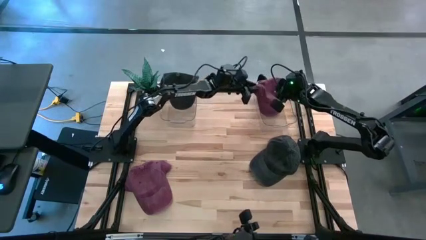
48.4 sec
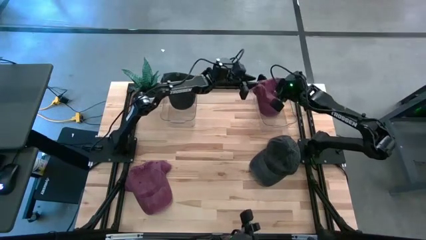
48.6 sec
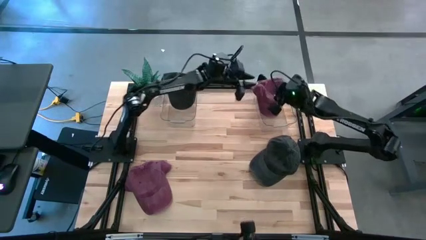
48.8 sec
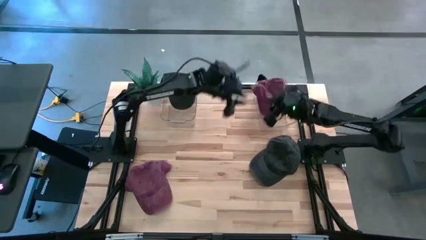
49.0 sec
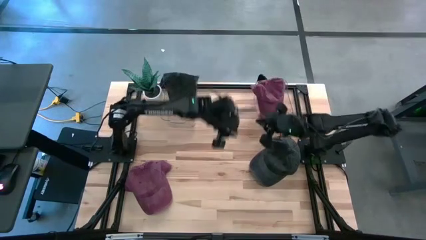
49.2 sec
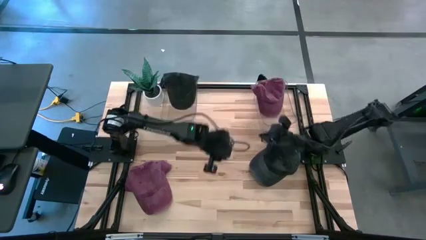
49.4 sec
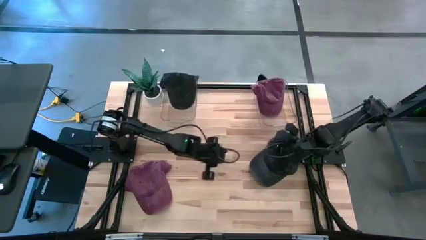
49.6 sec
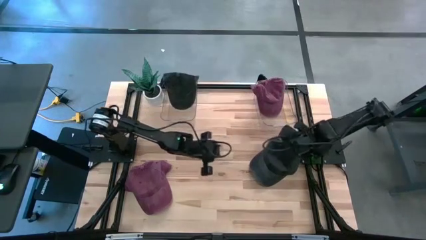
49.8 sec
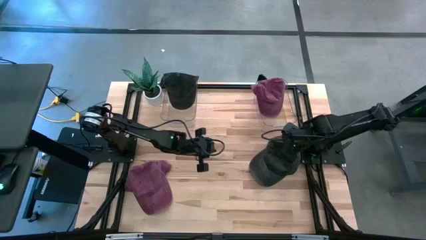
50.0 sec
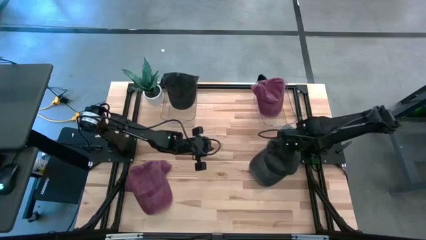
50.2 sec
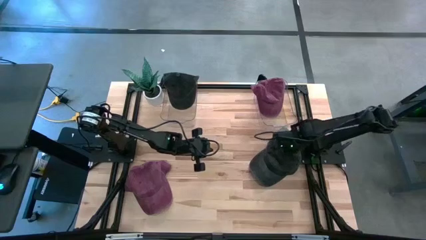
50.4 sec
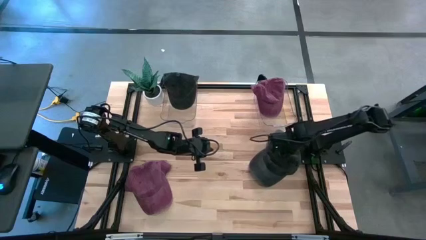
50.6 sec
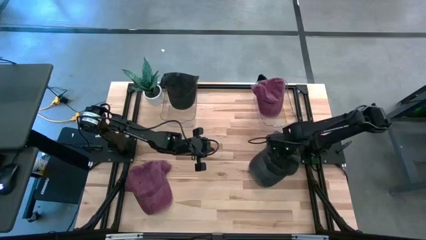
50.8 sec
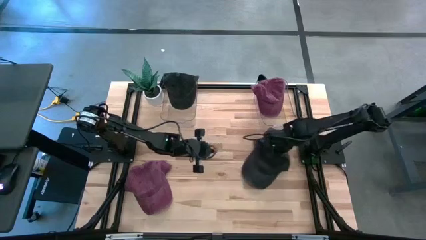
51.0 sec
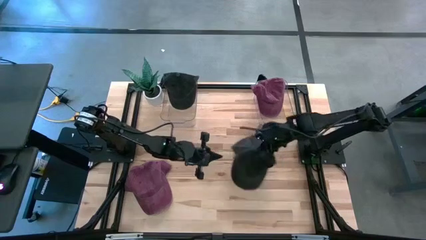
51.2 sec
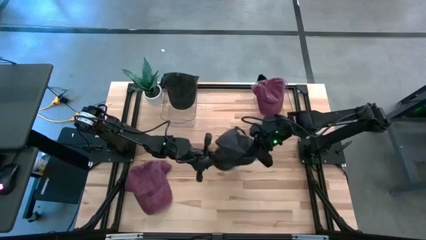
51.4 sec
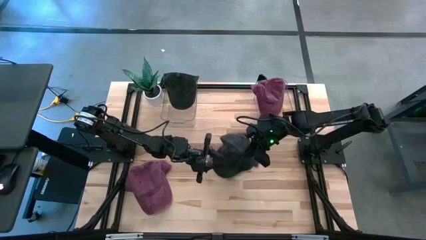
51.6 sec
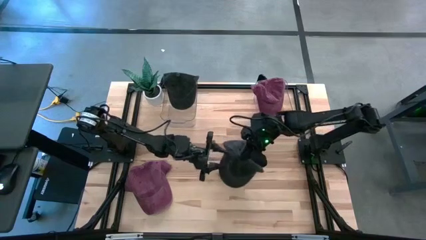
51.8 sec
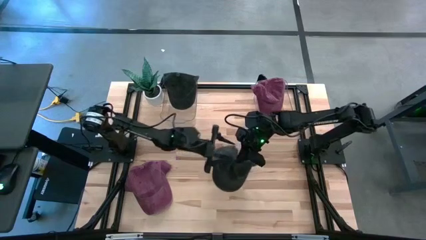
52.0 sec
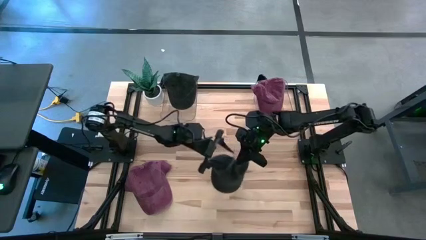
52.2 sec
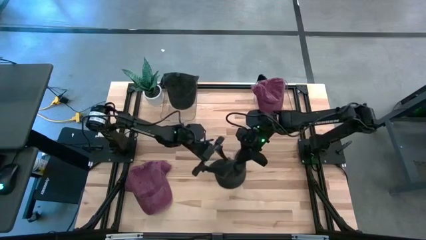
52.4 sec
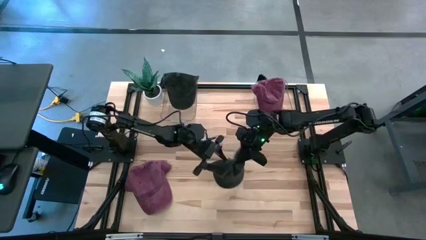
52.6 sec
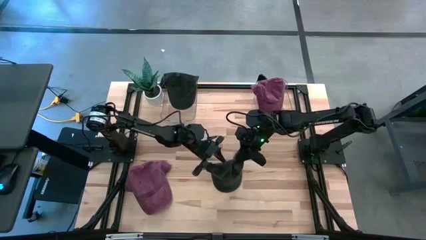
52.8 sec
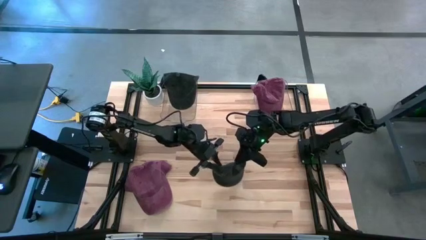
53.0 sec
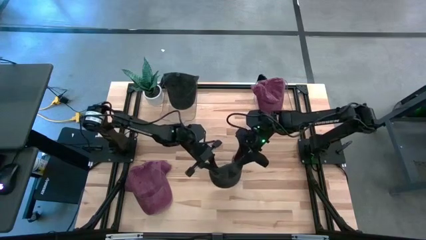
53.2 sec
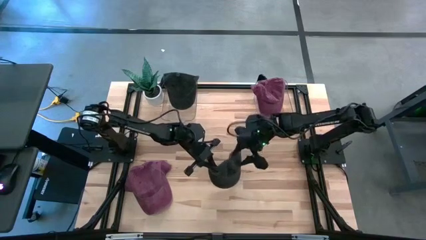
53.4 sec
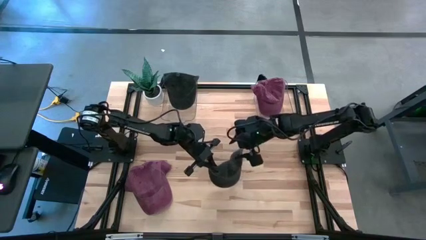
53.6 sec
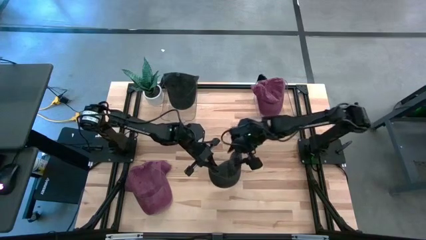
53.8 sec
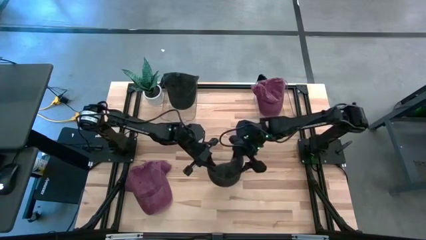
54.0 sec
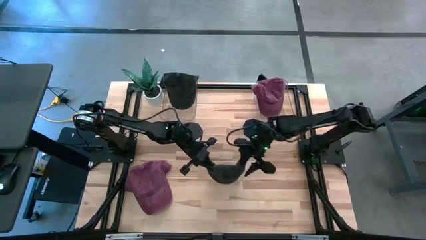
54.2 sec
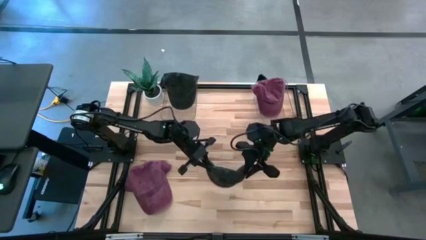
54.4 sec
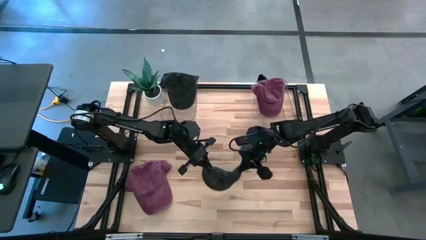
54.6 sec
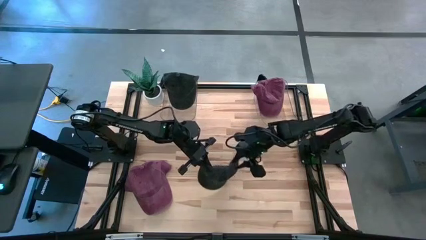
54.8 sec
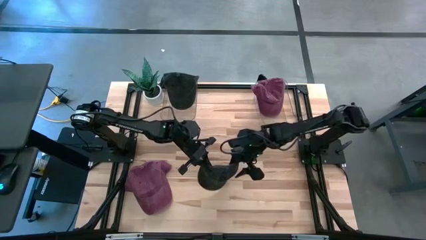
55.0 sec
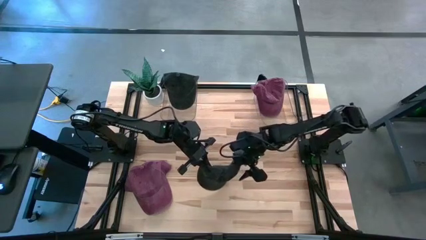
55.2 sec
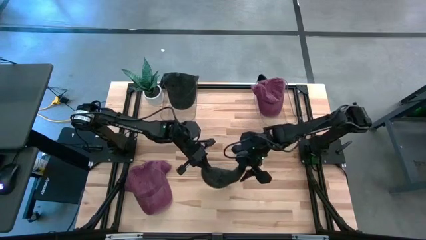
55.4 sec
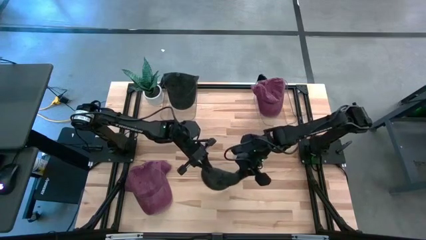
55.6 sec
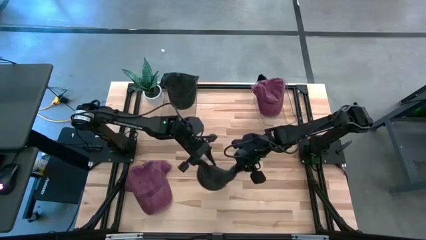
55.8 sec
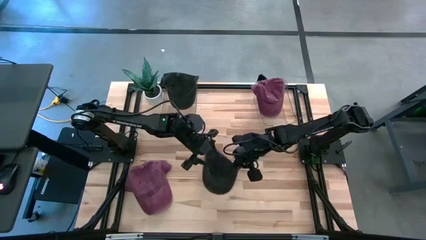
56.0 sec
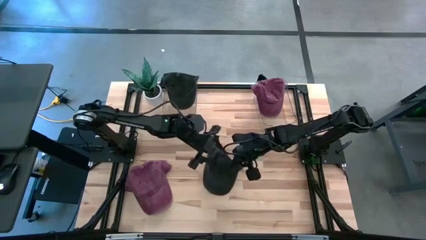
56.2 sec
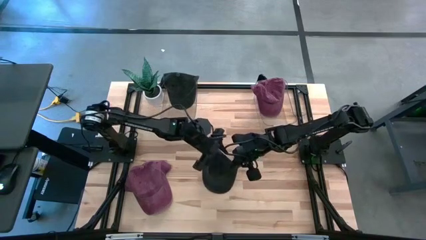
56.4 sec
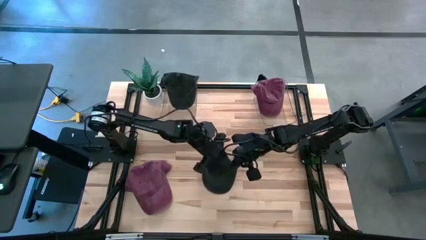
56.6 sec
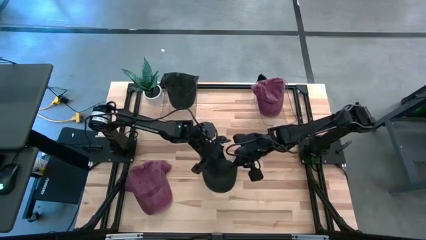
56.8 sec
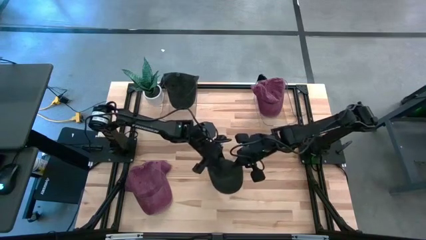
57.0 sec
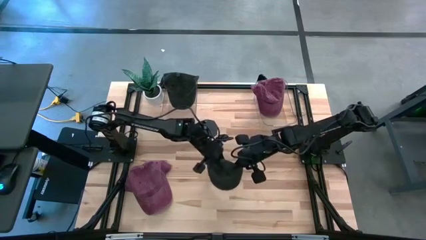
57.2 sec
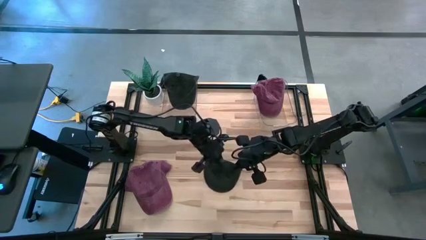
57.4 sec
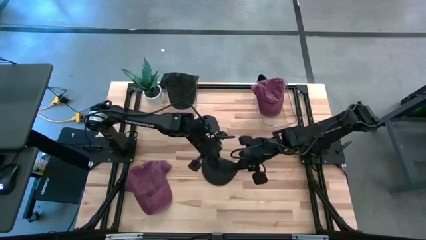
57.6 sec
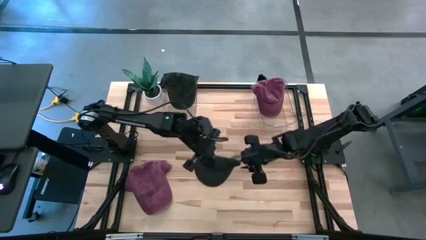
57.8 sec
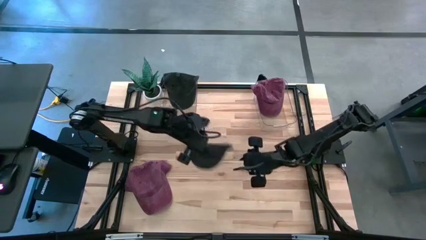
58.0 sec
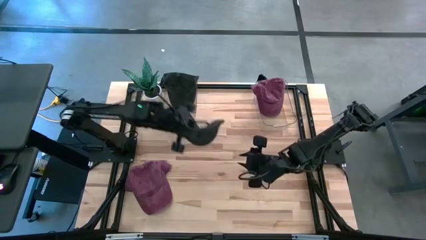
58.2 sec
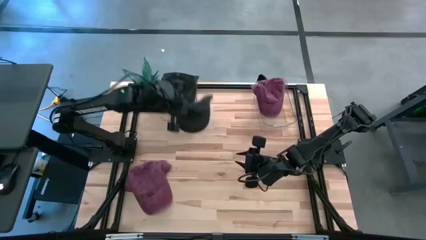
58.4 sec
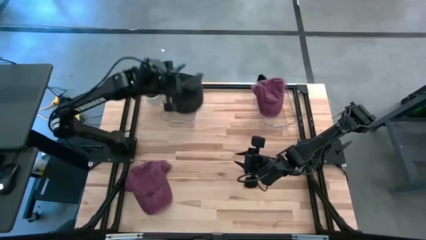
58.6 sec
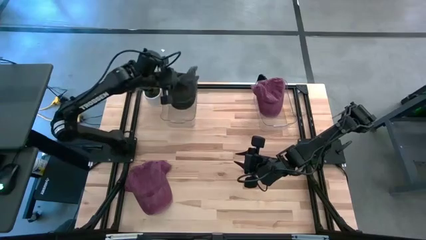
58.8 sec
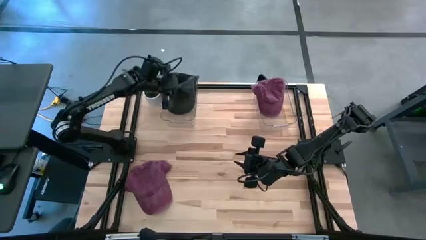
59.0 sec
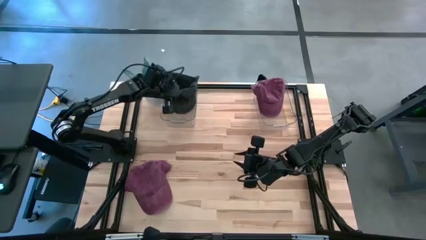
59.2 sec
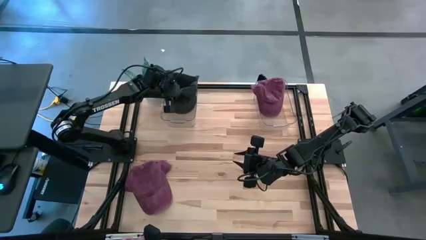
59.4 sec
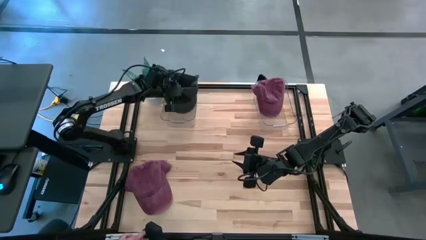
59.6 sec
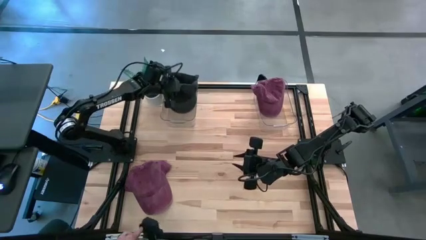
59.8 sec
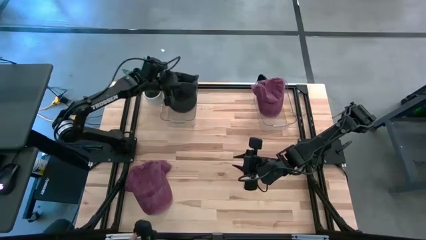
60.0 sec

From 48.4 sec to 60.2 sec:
Task: Pick & Place hat
Put the black cap into the left transparent bin
